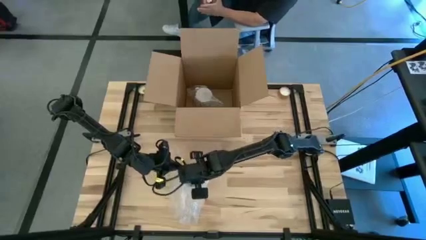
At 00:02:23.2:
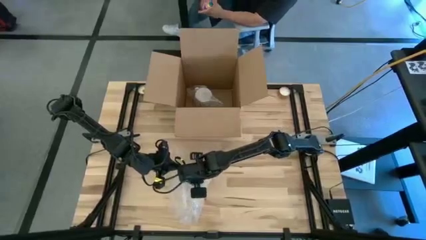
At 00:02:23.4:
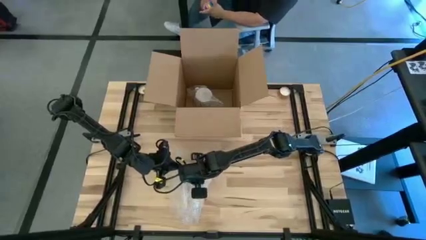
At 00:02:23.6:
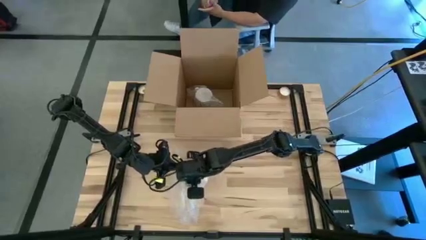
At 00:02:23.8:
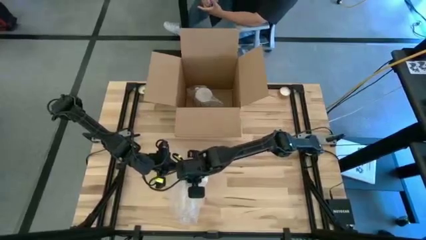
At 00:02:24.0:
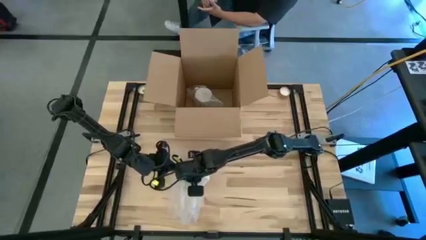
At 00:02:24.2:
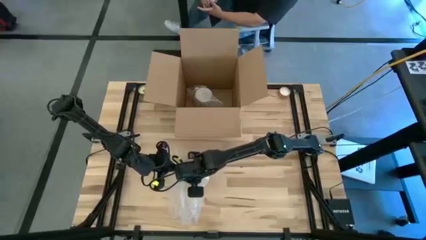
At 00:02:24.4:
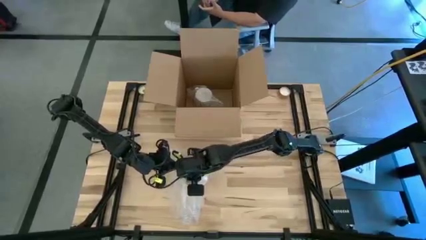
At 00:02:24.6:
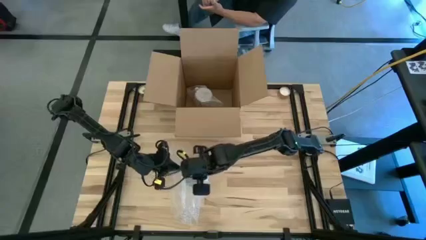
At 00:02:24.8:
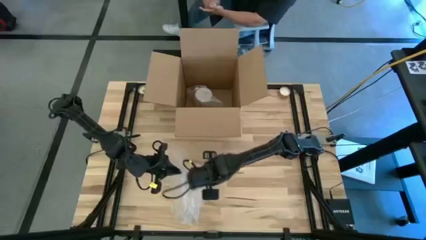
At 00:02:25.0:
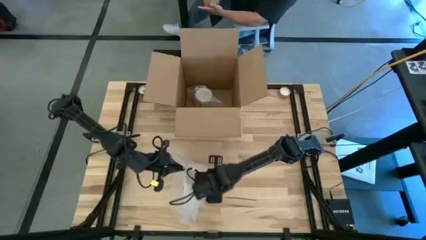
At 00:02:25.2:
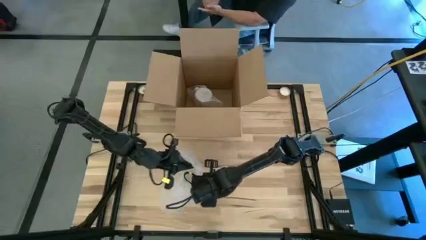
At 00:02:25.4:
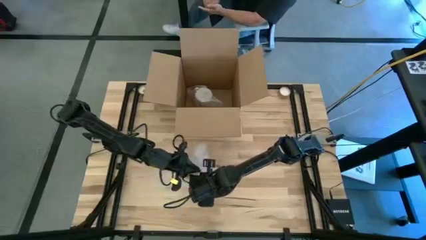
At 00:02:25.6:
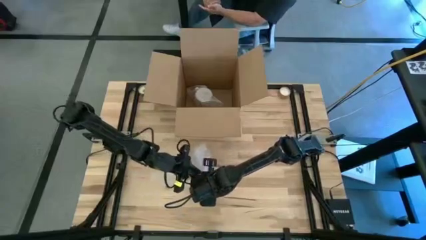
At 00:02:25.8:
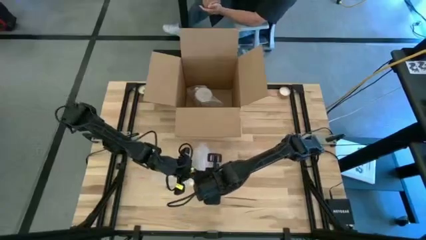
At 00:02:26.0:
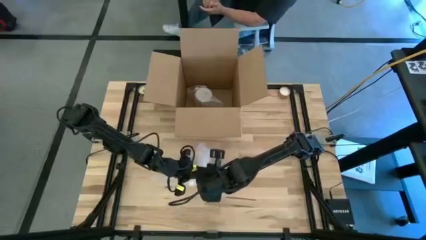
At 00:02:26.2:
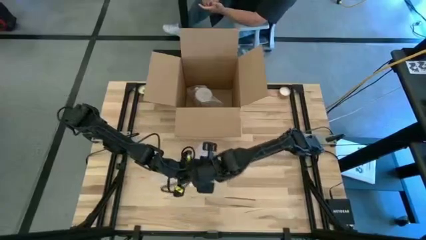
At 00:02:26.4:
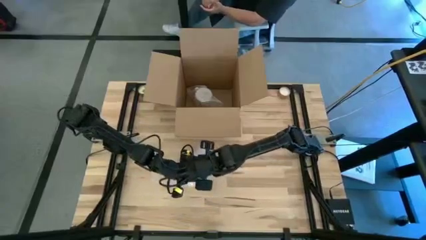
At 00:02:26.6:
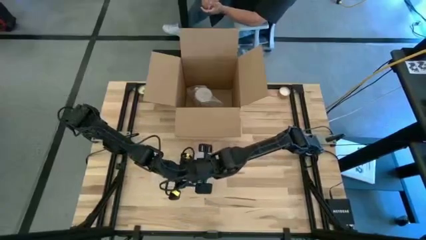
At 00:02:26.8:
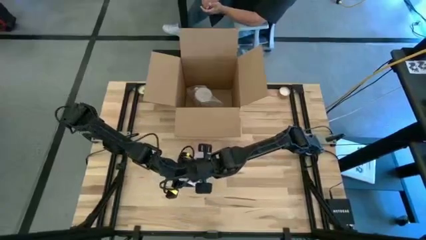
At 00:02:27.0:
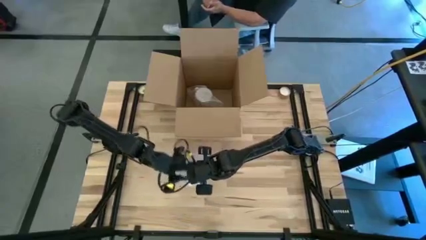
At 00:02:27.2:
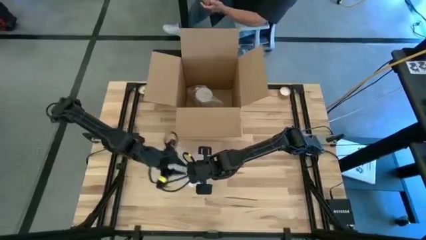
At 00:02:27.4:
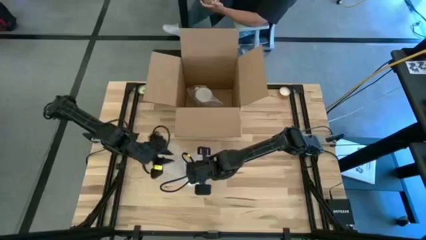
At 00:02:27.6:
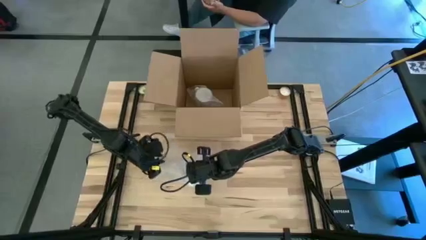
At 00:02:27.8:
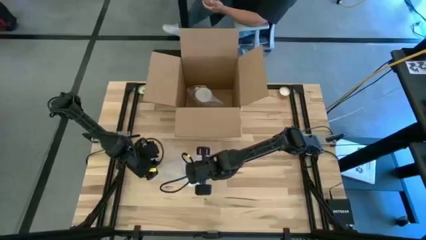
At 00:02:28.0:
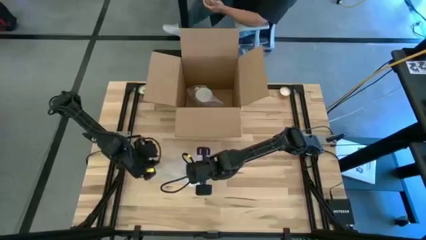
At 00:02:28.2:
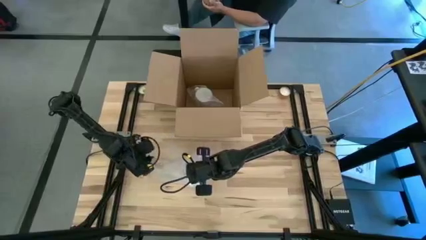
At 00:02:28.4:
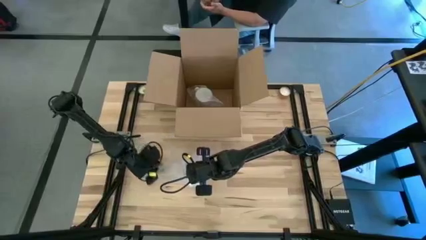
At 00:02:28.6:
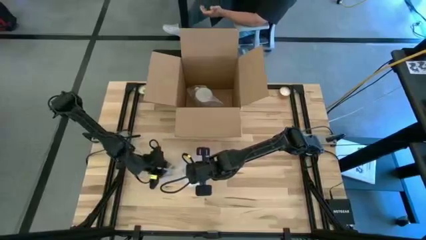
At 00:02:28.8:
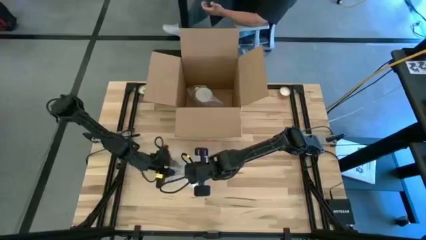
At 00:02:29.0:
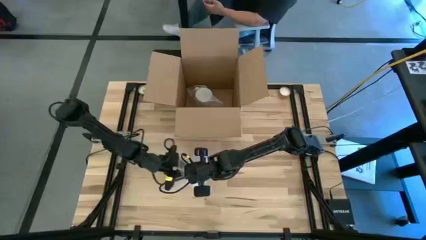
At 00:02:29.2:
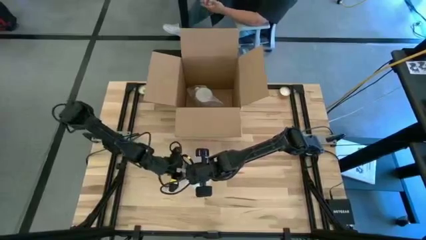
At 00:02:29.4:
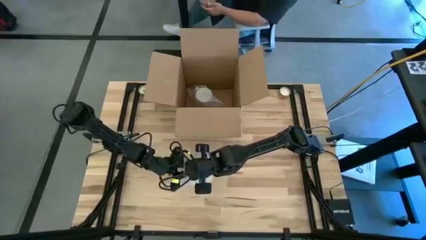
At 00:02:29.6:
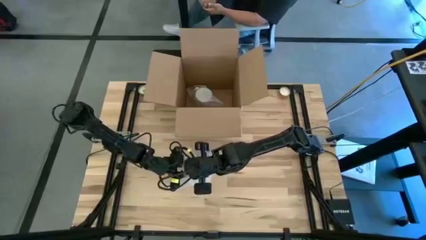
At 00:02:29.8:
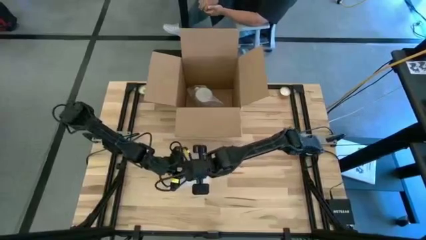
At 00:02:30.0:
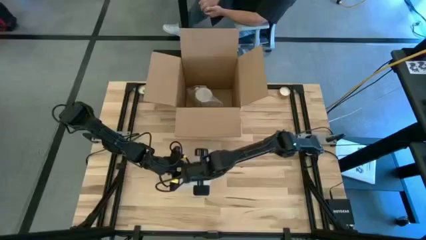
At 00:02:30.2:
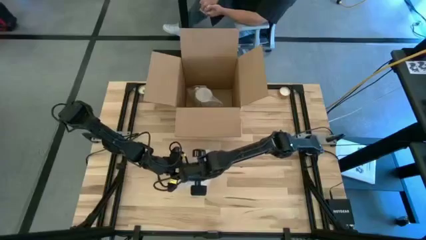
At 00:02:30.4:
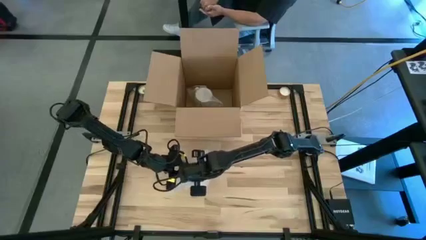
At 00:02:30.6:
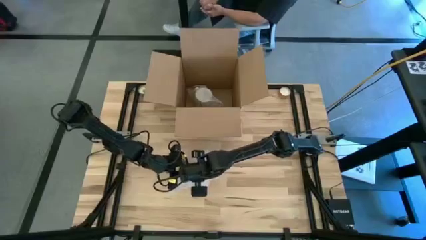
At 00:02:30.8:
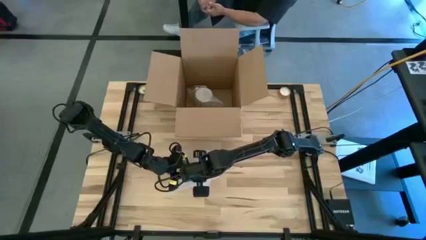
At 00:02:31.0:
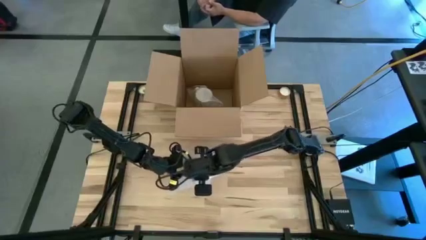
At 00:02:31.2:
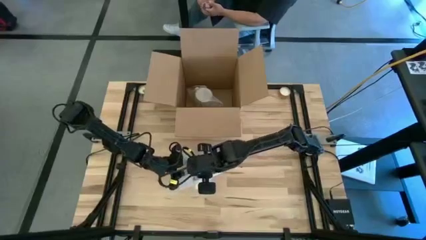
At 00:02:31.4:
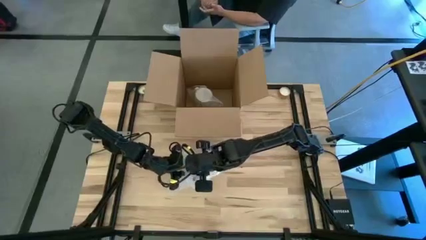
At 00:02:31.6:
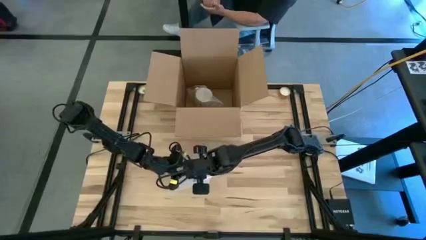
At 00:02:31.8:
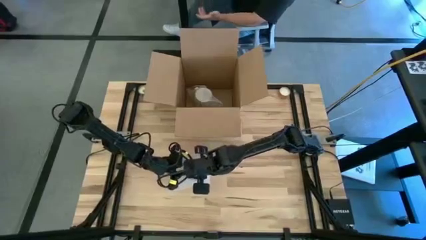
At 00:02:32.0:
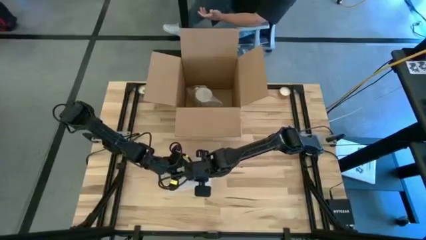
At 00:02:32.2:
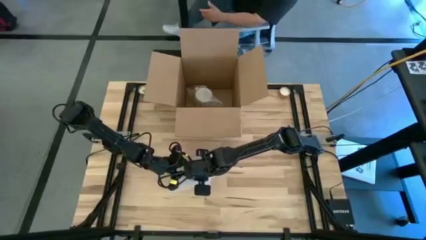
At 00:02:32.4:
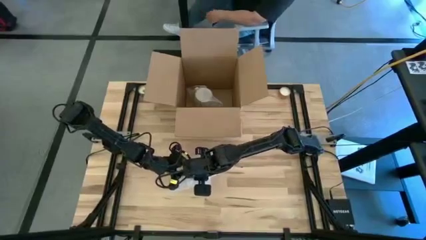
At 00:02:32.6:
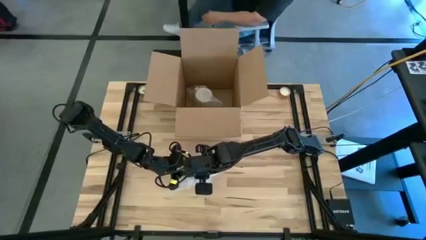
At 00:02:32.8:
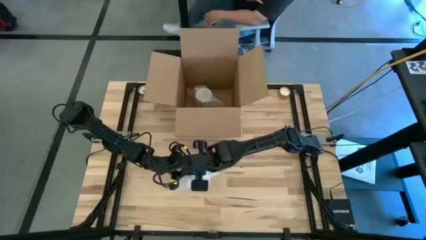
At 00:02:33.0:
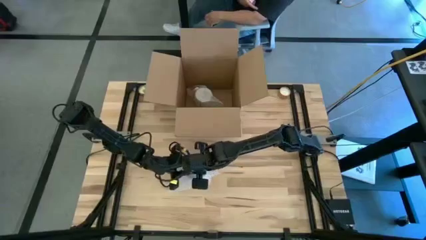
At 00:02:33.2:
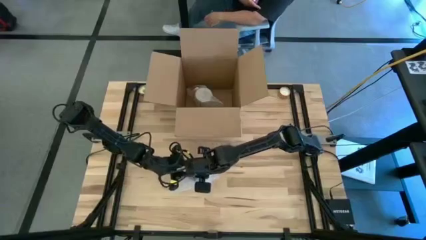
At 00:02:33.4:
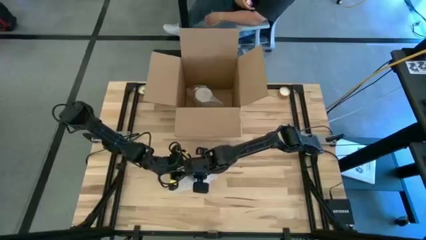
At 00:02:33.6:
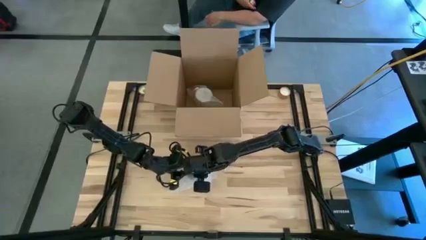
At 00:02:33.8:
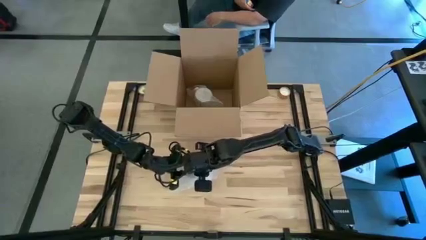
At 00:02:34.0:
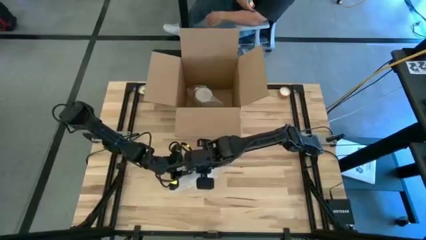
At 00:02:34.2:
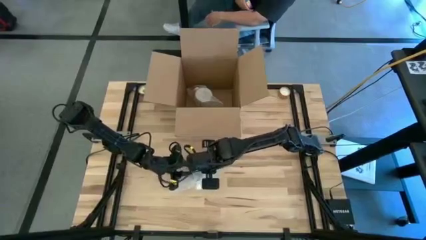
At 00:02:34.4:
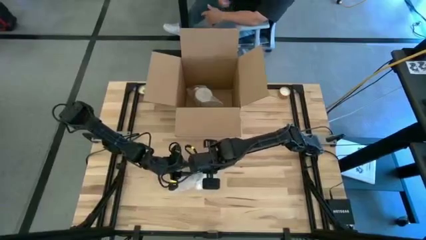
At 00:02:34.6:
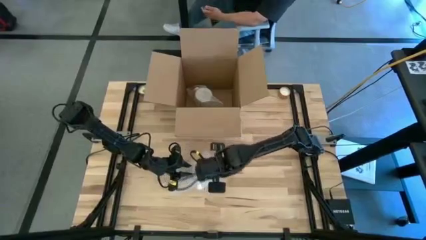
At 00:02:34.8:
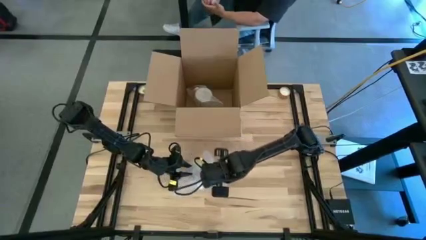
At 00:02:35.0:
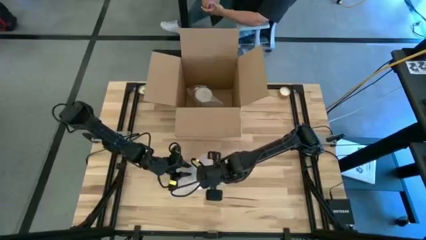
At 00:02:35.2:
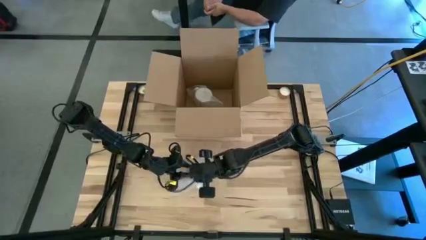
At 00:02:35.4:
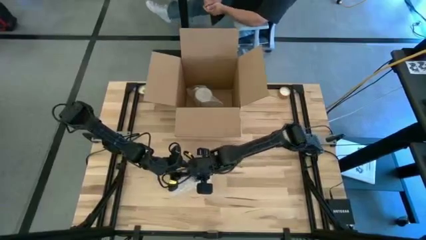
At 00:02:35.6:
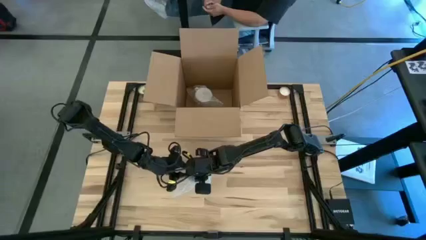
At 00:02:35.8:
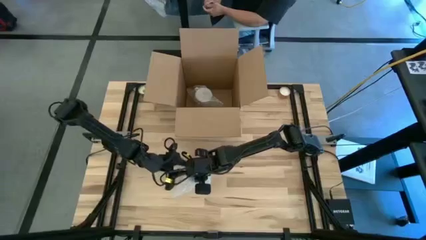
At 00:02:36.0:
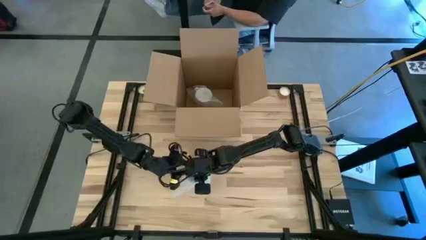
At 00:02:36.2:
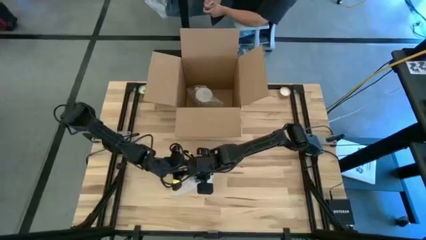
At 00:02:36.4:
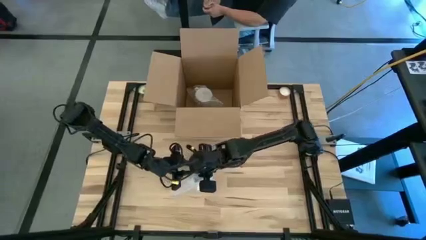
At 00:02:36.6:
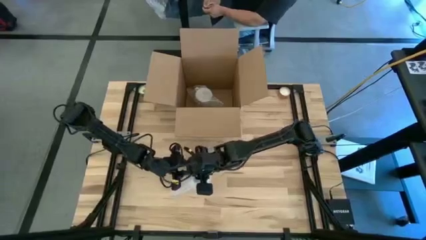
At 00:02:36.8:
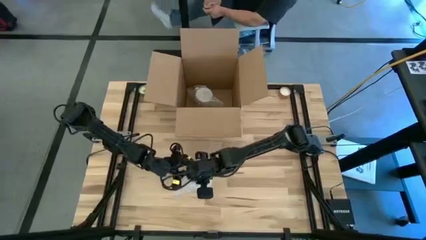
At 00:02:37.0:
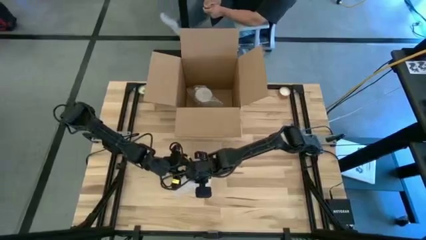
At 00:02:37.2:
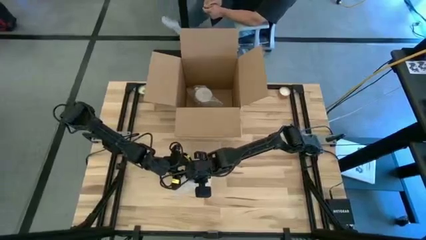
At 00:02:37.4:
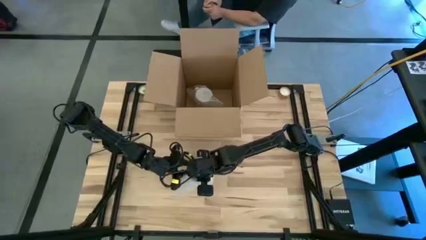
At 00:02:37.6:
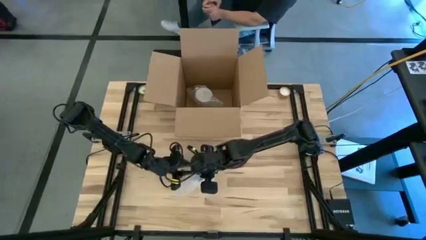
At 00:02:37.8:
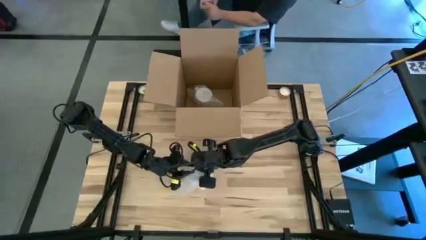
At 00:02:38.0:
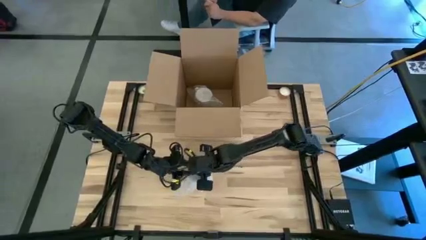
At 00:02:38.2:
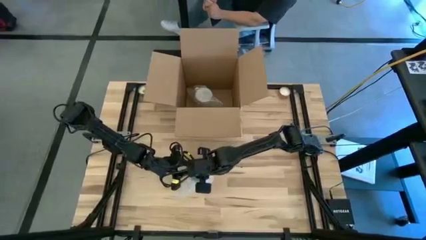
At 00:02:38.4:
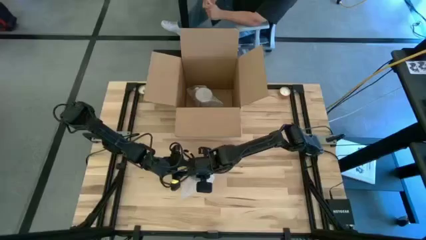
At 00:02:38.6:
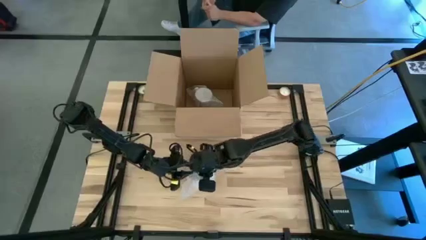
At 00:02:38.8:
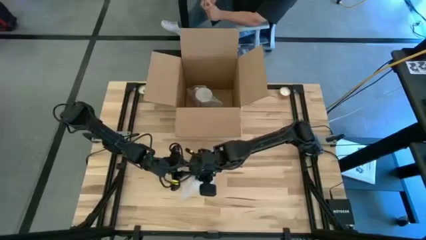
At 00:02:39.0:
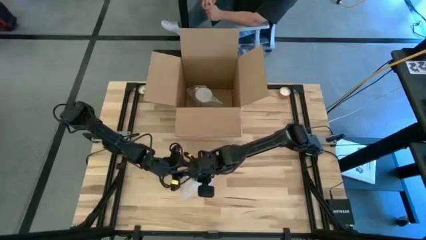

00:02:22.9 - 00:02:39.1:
Task: wrap mug
Wrap the yellow mug with the bubble wrap
